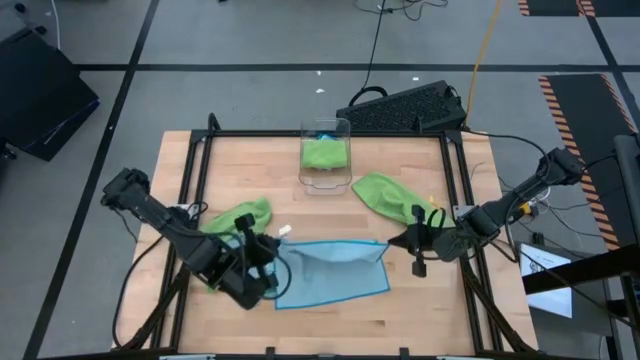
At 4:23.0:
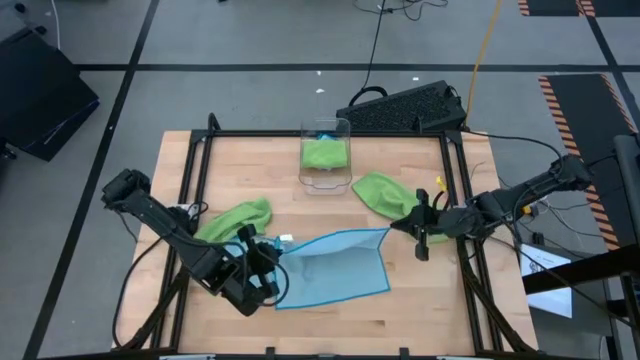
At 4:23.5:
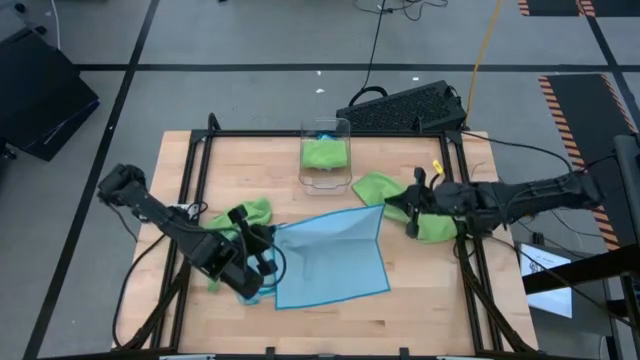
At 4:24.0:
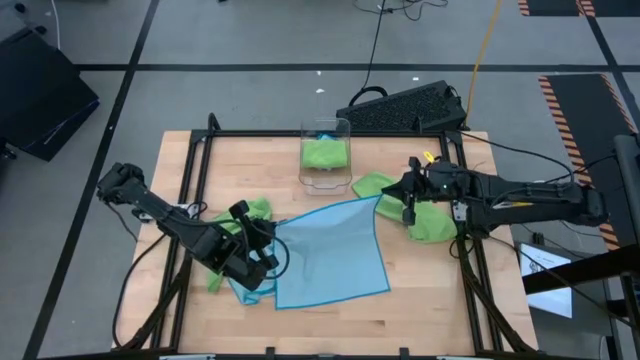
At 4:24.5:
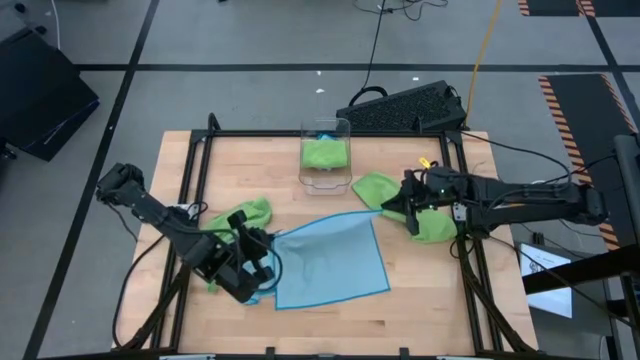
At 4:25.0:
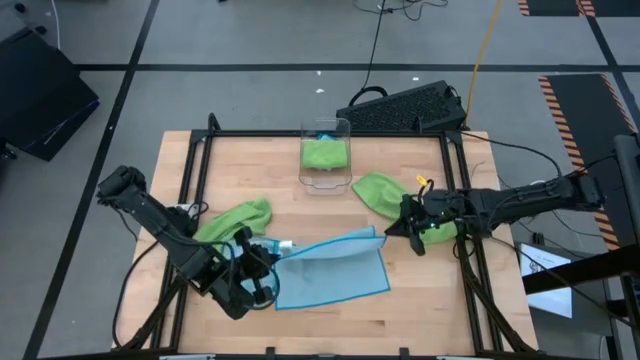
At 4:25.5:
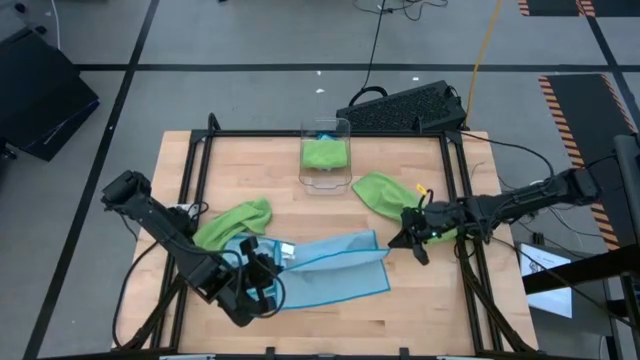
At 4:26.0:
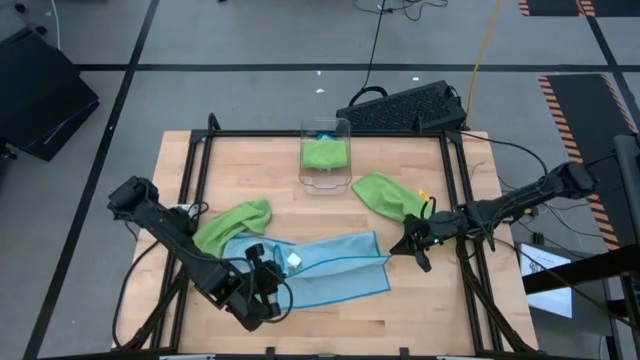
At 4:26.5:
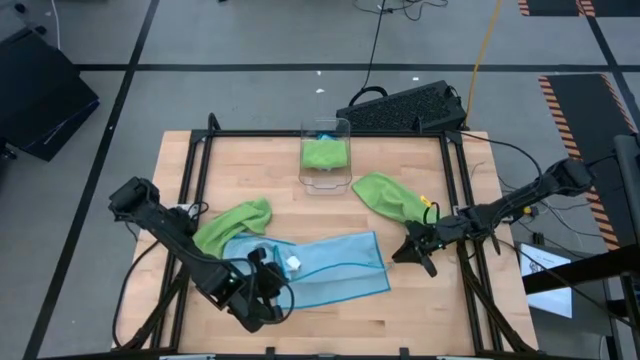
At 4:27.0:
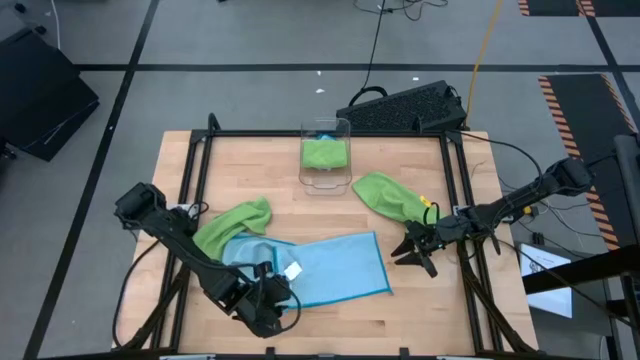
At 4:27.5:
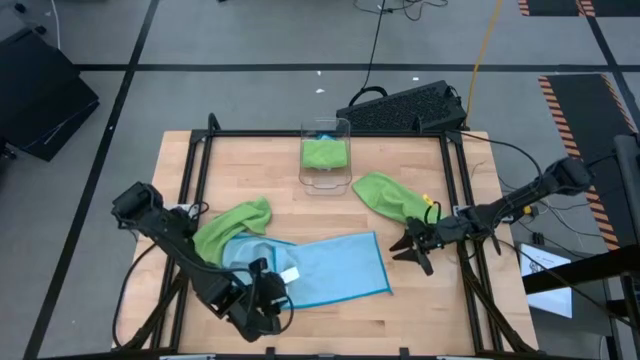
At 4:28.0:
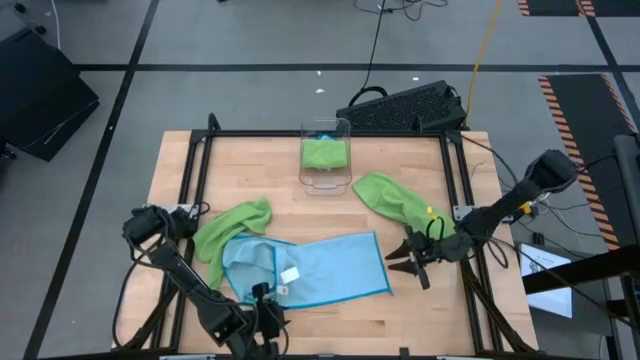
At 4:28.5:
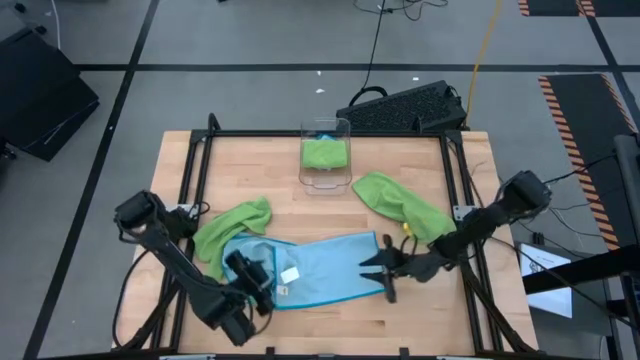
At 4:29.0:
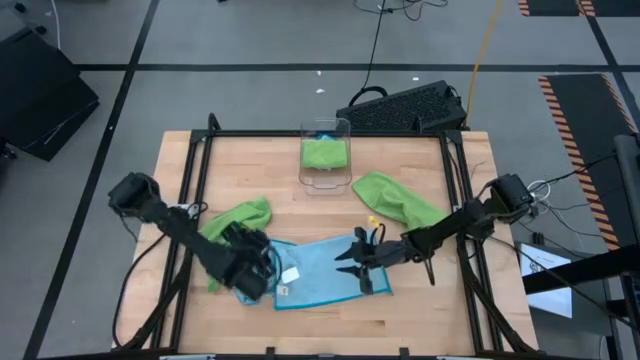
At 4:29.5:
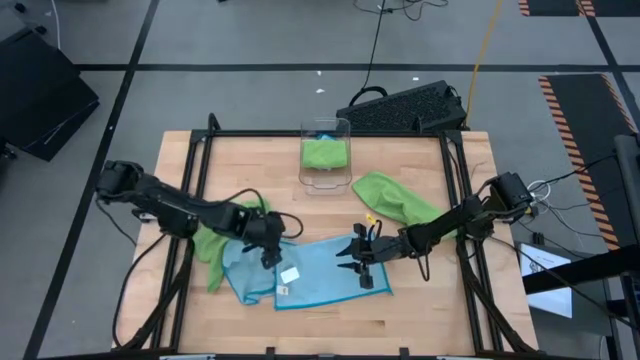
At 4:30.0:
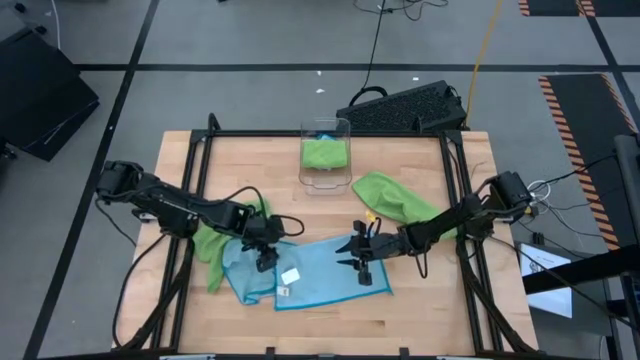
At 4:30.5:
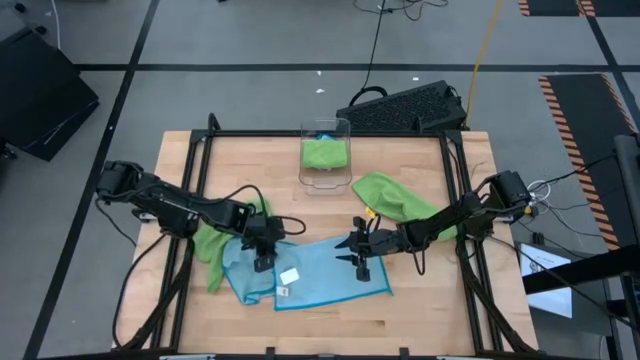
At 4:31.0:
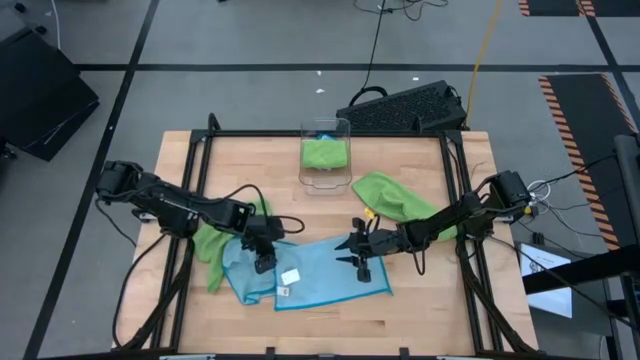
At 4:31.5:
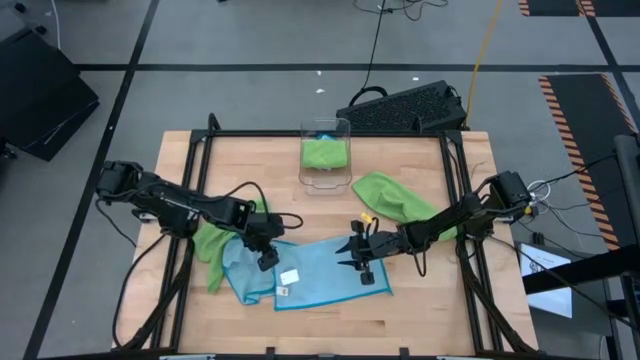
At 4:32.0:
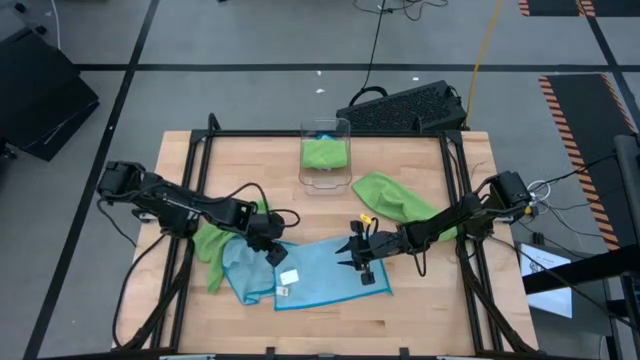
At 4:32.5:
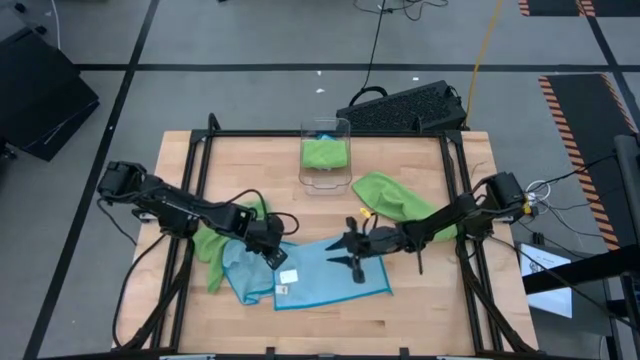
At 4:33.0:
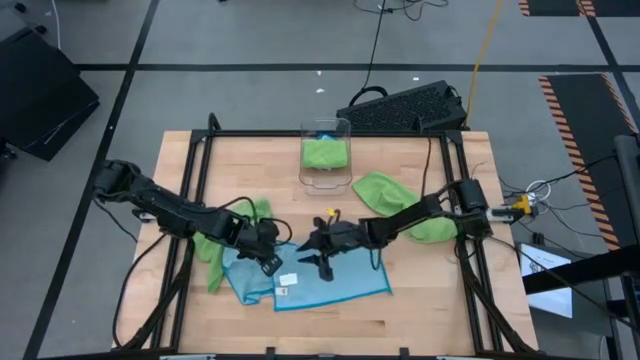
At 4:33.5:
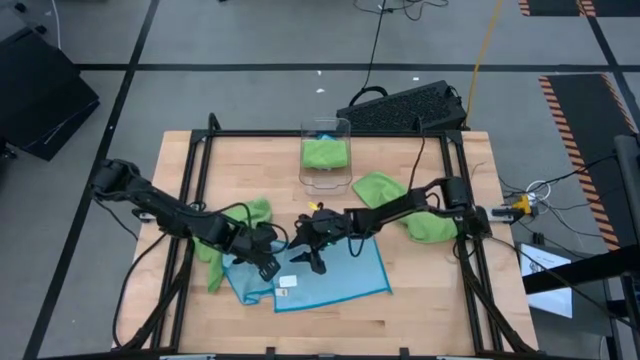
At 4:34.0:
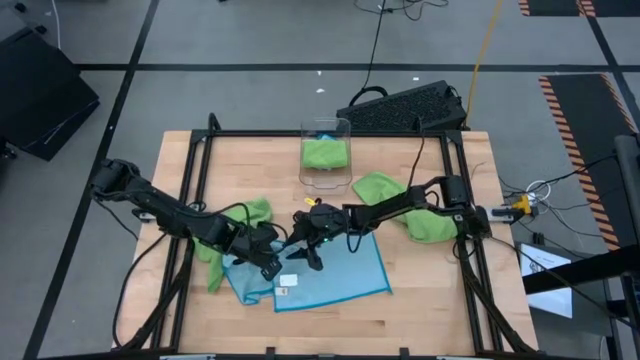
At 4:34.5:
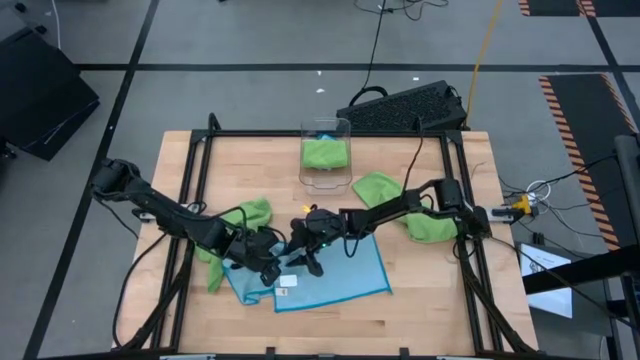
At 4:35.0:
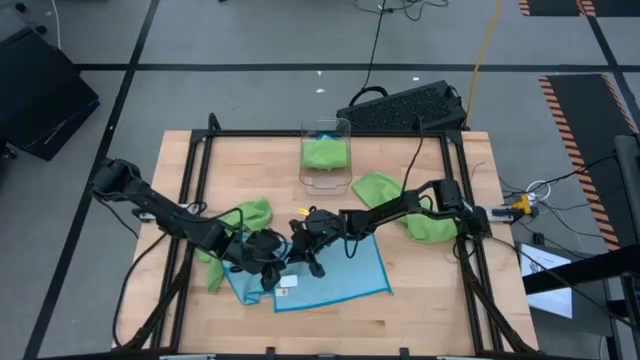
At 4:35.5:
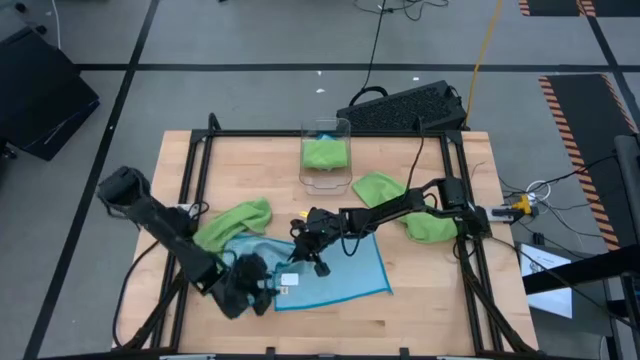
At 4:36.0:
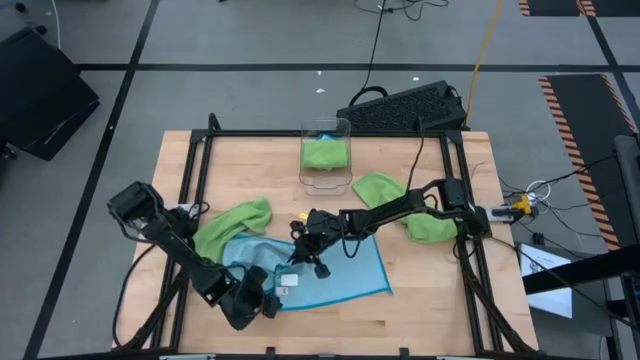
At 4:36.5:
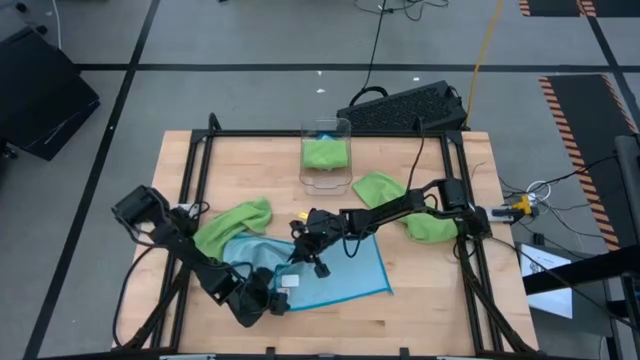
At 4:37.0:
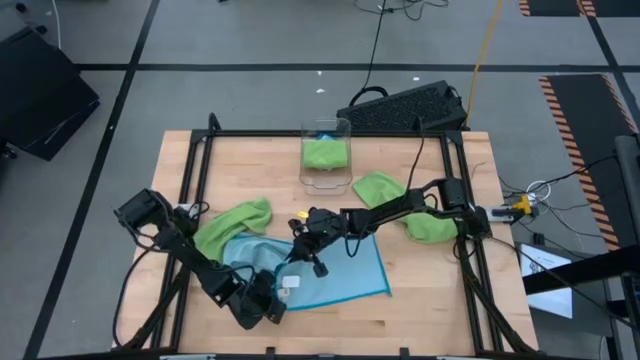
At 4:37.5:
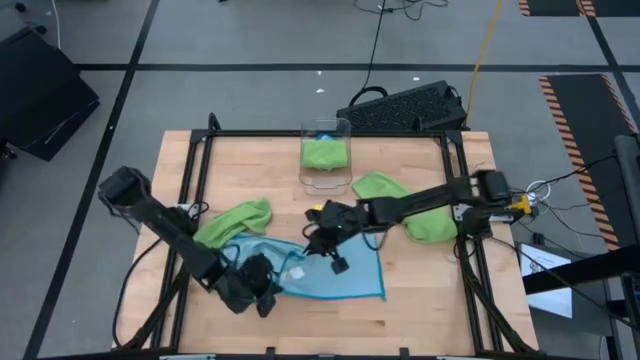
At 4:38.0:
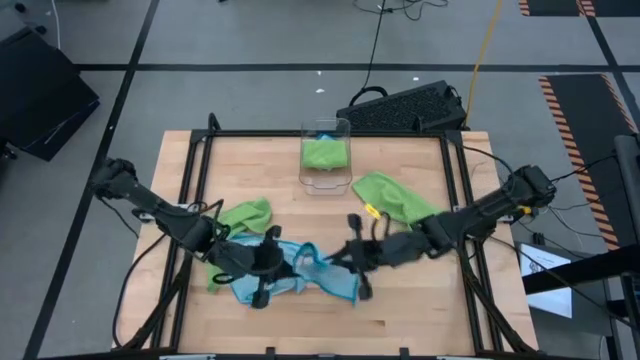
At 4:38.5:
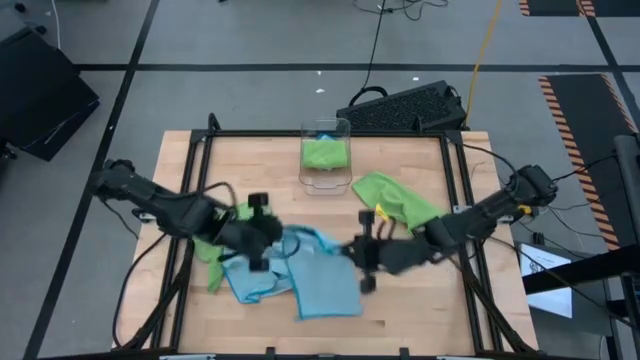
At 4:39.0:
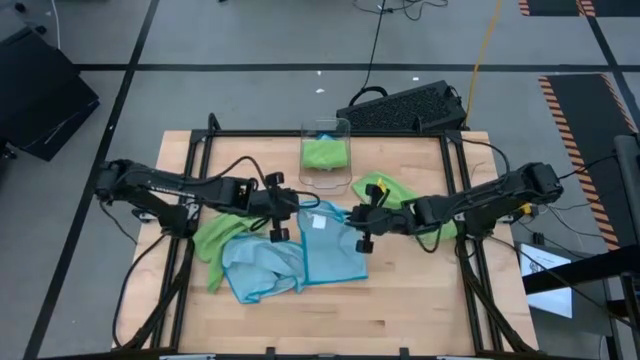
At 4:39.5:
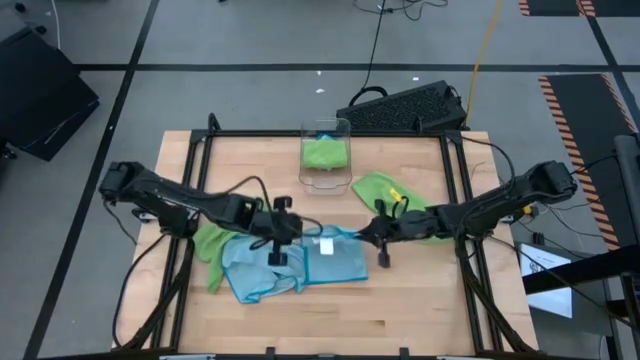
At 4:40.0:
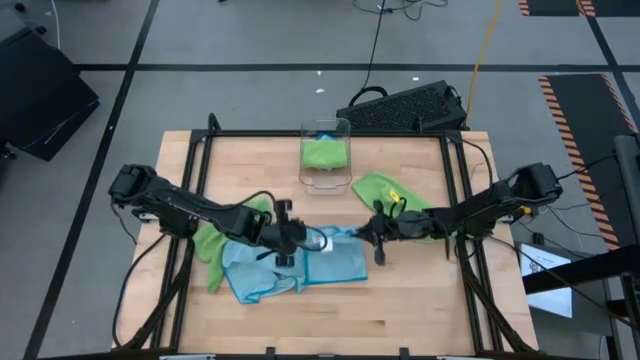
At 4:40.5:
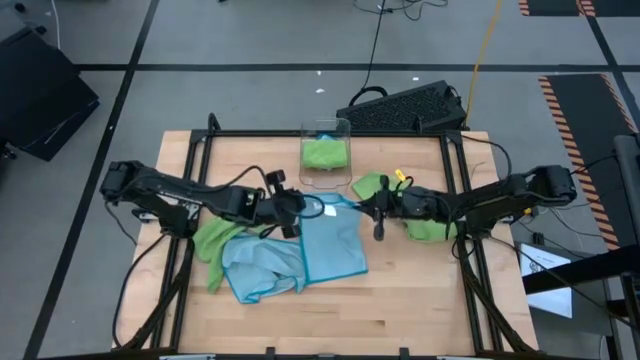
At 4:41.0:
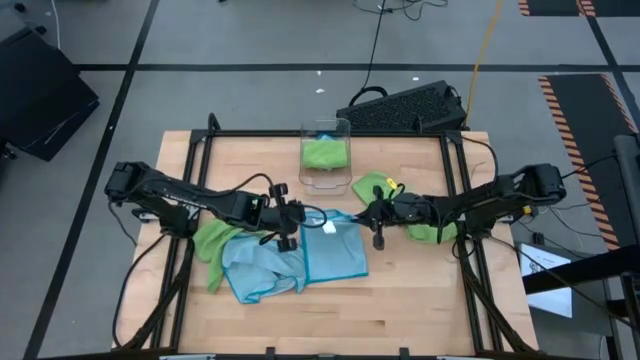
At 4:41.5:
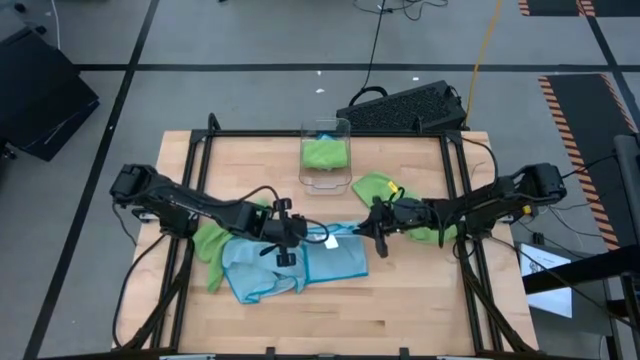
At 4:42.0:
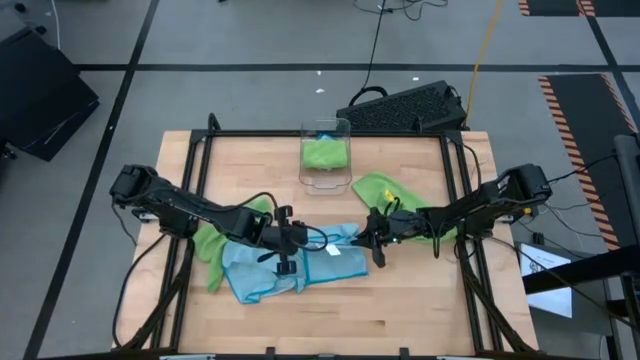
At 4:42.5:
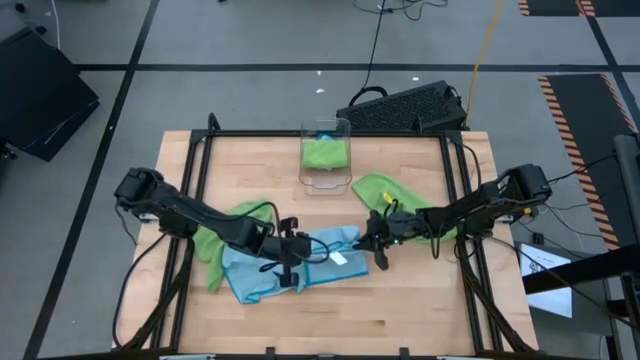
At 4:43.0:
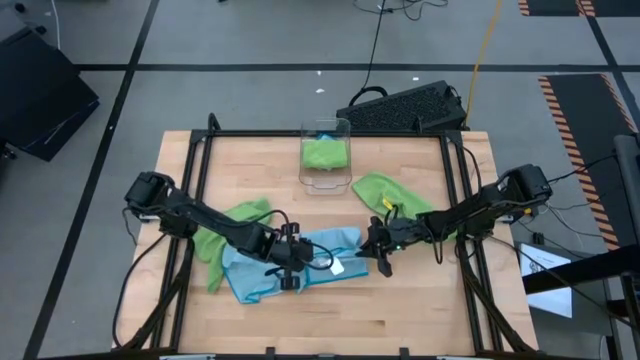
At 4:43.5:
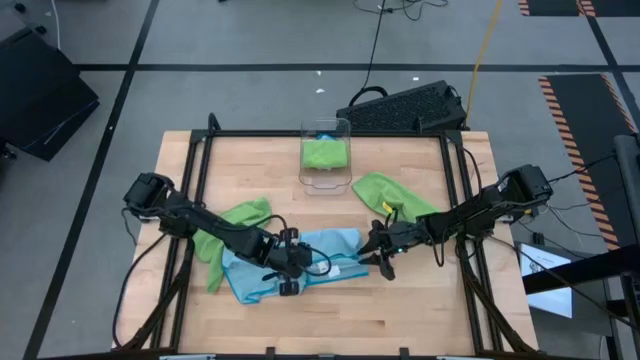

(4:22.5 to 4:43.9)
Task: Fold microfiber towels
Fold the right blue towel
